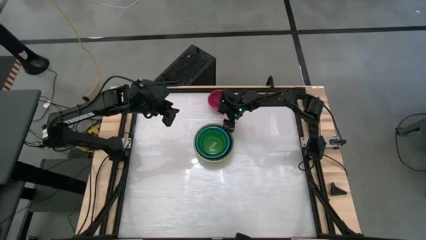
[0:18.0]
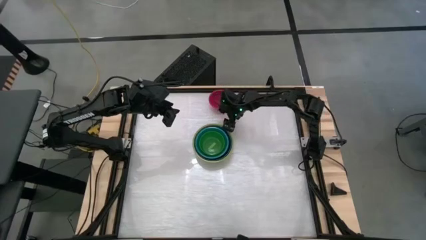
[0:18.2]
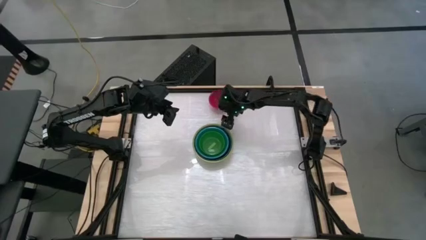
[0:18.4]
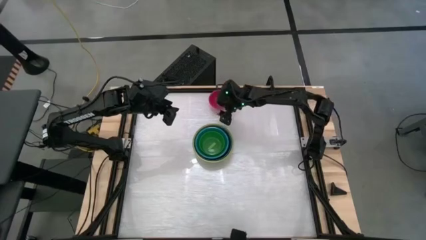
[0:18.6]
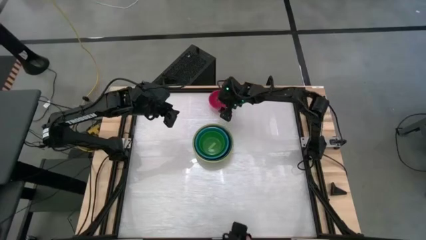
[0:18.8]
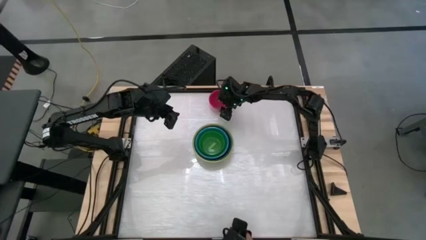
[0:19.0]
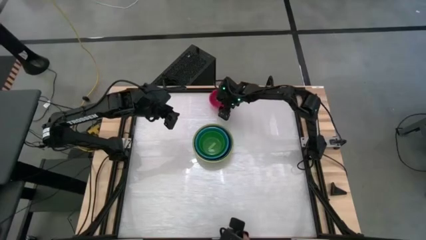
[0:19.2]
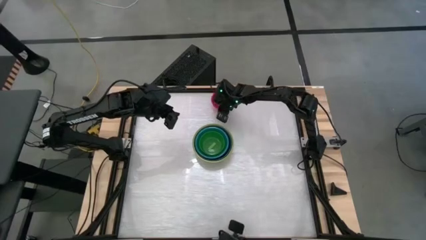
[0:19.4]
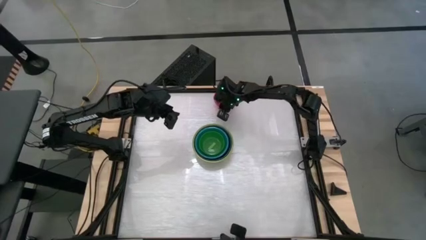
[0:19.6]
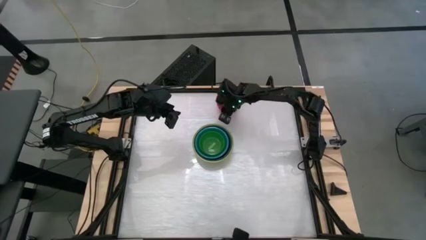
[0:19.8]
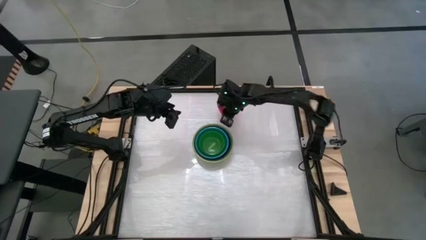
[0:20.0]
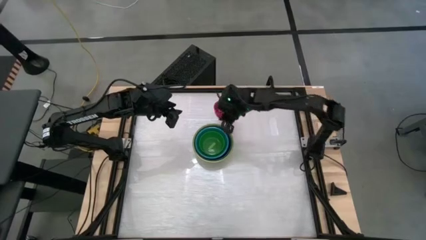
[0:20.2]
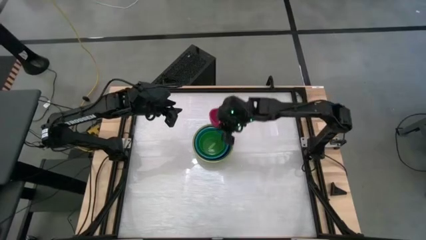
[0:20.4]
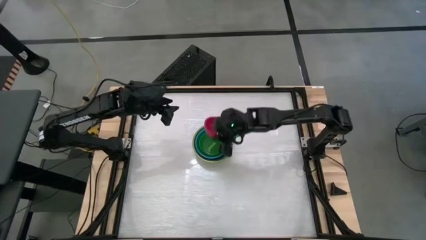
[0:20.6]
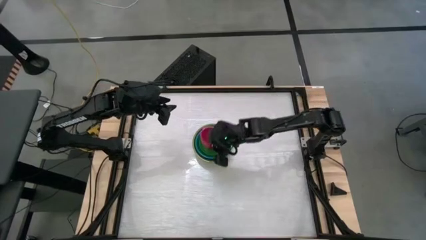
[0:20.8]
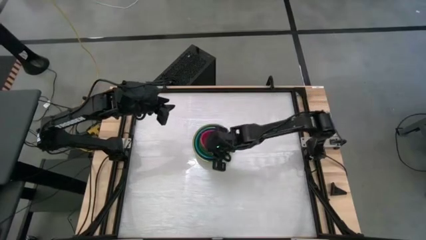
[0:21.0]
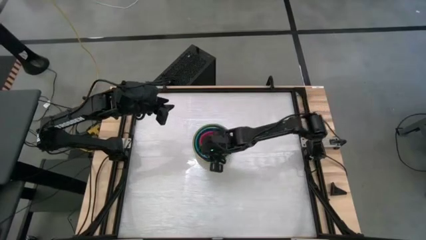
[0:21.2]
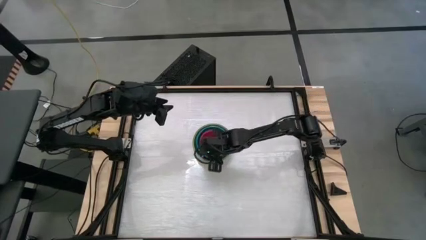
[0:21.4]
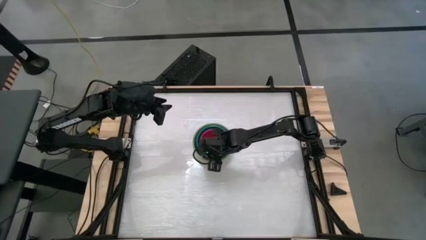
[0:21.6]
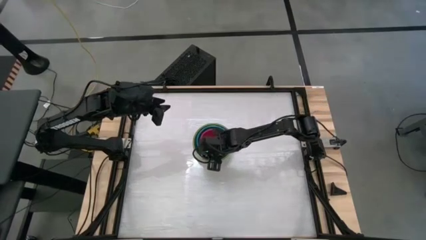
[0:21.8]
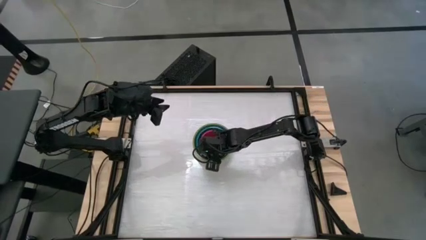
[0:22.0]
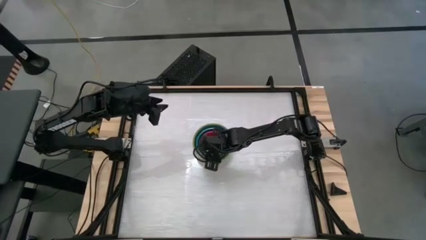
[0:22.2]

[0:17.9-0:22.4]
Stack the red bowl on top of the green bowl

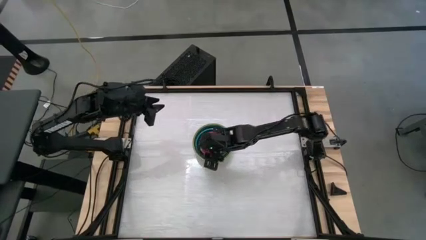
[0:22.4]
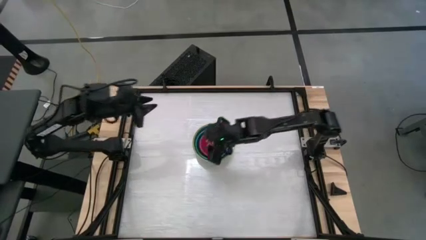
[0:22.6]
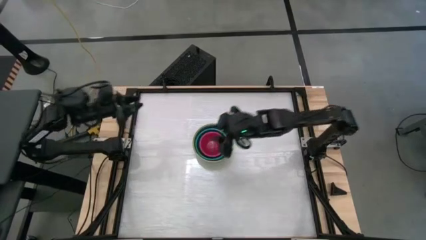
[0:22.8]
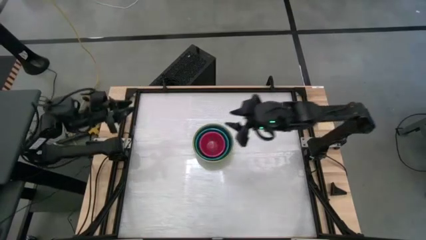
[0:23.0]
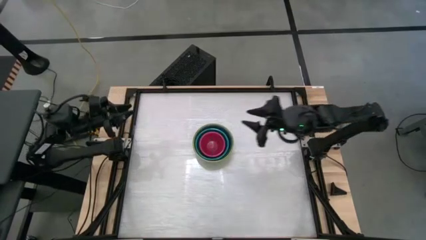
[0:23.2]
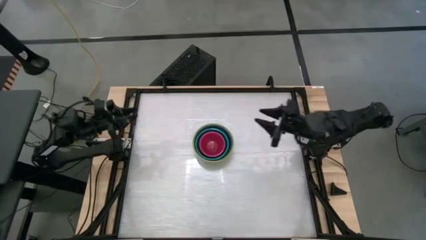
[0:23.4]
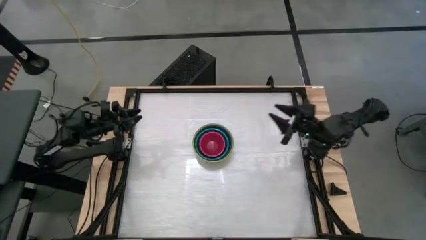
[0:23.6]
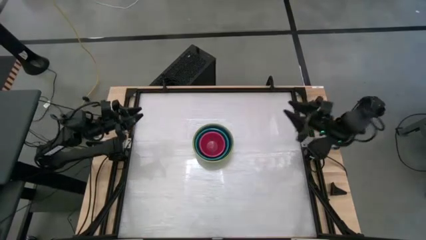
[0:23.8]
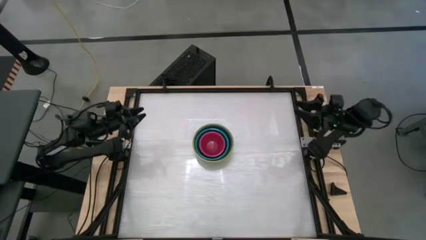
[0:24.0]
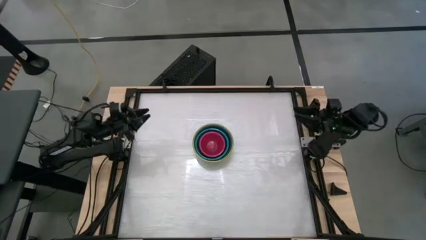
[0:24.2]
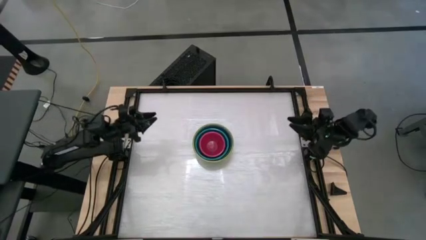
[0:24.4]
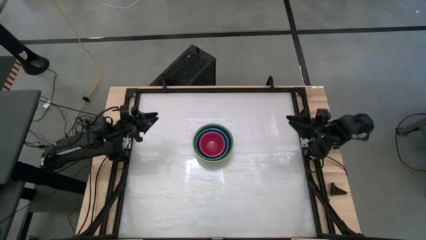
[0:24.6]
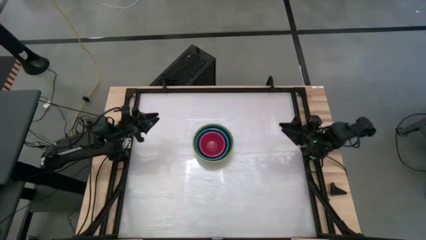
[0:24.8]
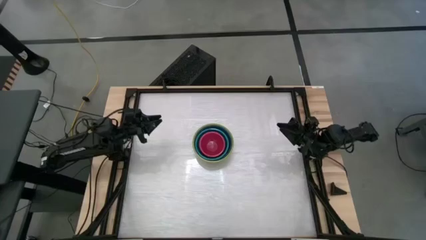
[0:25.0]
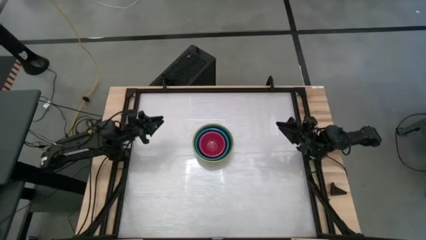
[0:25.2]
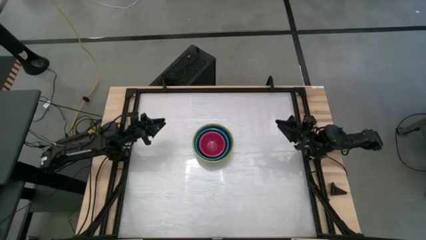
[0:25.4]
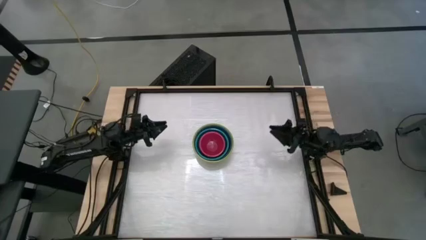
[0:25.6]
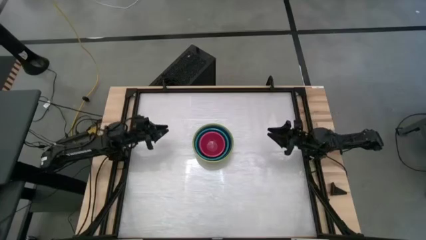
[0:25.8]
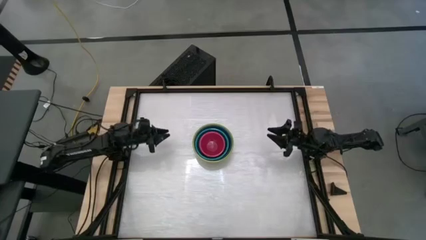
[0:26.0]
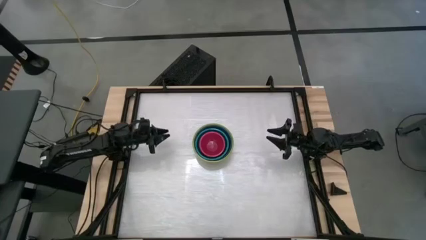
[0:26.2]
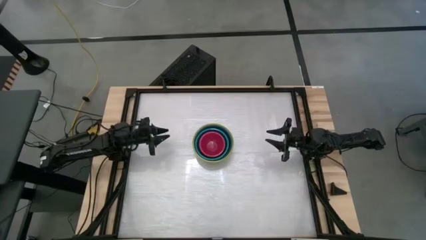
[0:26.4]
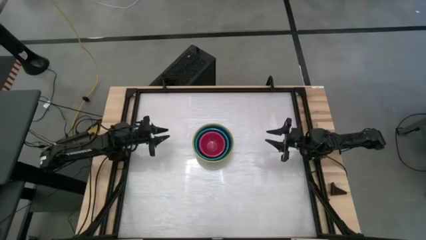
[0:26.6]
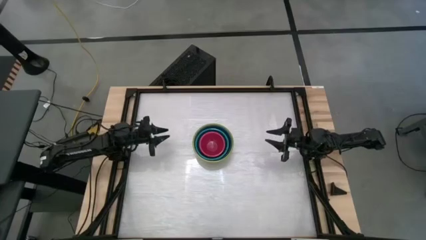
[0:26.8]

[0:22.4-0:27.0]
Return to Home Position
